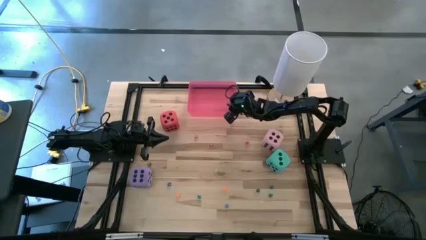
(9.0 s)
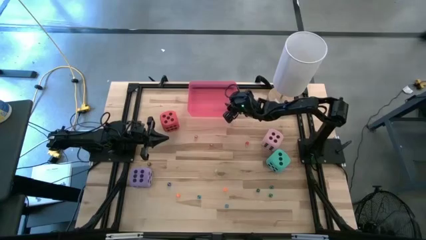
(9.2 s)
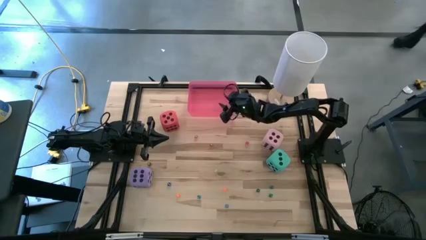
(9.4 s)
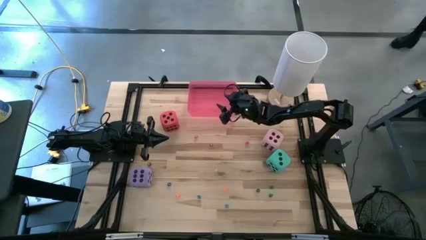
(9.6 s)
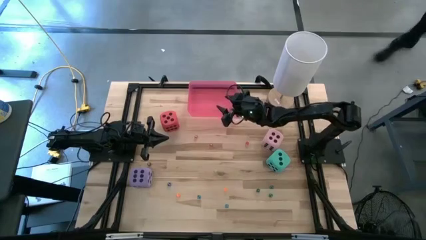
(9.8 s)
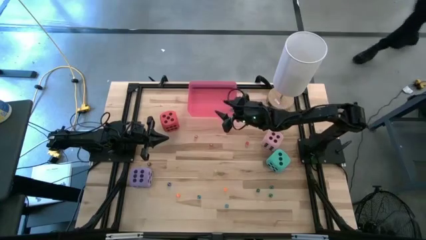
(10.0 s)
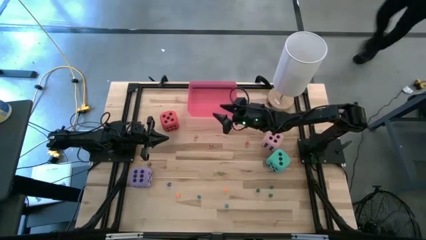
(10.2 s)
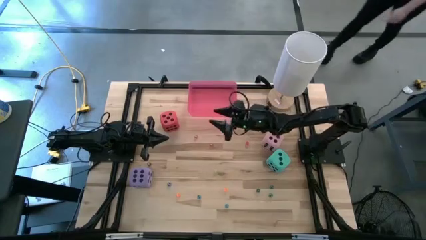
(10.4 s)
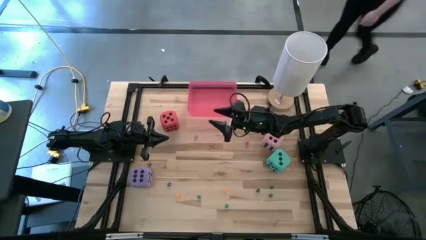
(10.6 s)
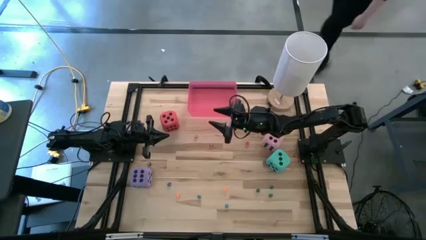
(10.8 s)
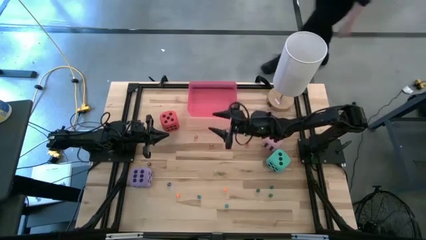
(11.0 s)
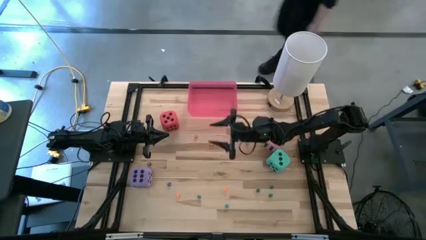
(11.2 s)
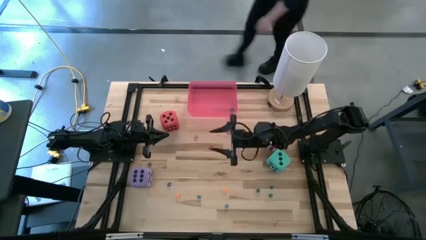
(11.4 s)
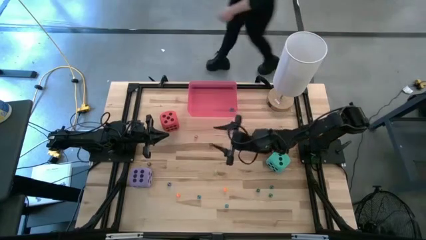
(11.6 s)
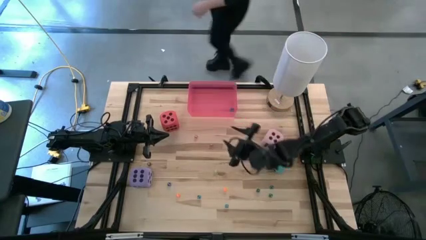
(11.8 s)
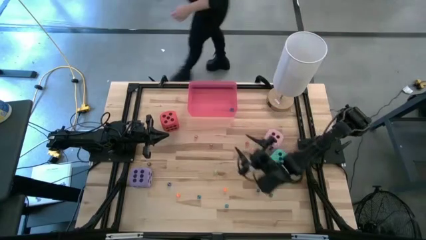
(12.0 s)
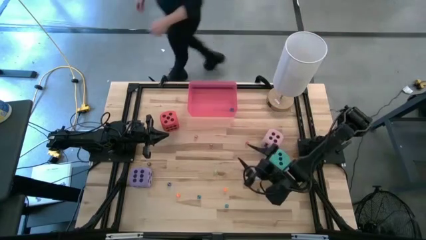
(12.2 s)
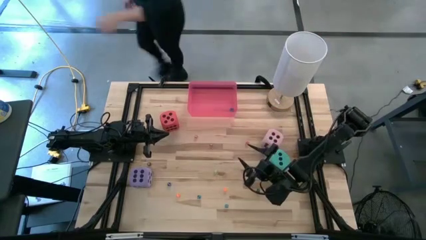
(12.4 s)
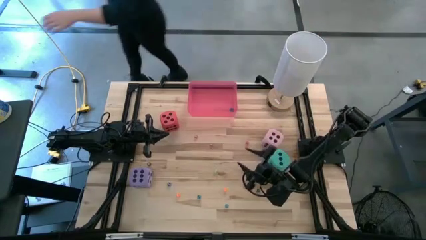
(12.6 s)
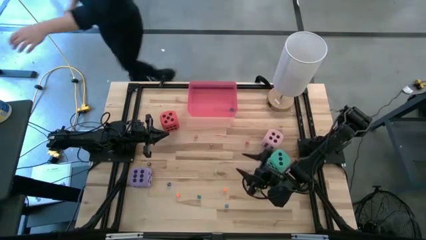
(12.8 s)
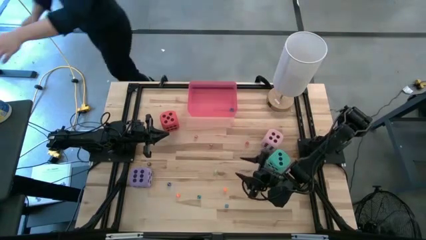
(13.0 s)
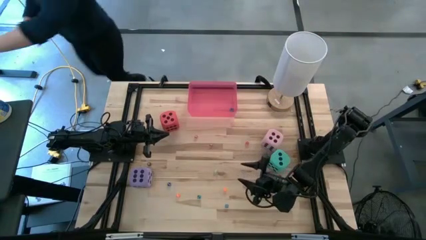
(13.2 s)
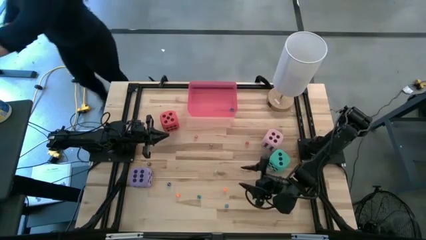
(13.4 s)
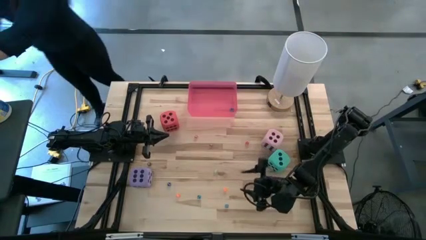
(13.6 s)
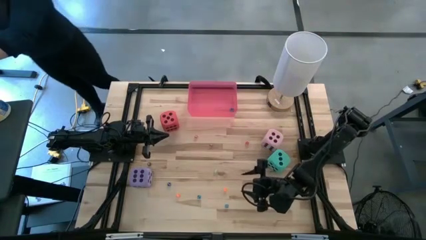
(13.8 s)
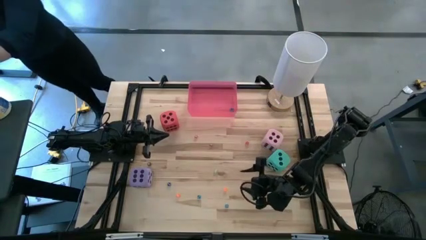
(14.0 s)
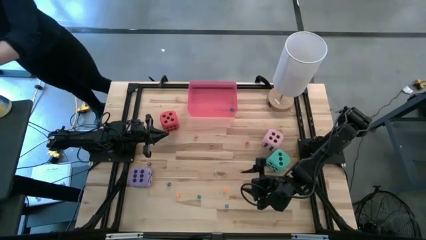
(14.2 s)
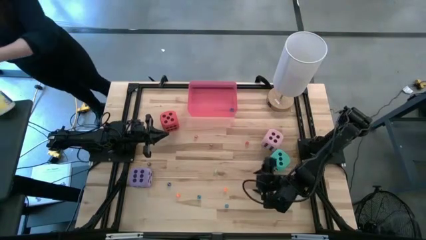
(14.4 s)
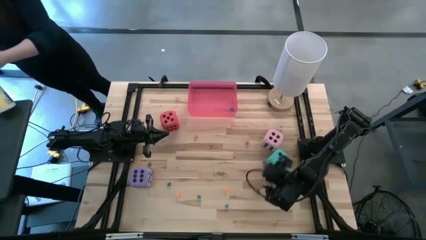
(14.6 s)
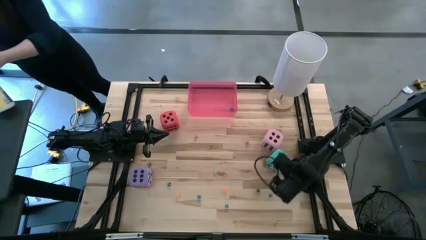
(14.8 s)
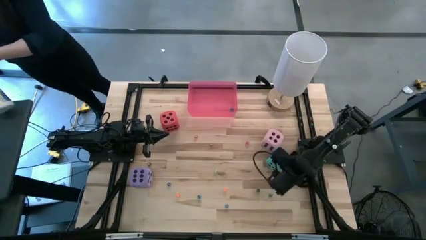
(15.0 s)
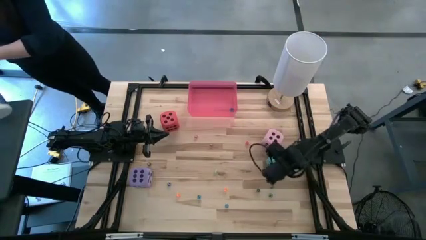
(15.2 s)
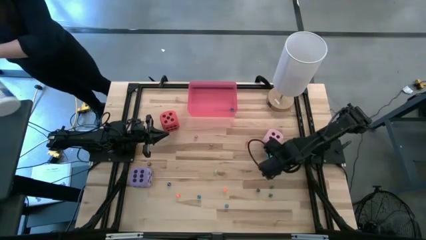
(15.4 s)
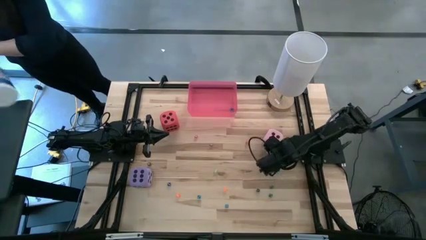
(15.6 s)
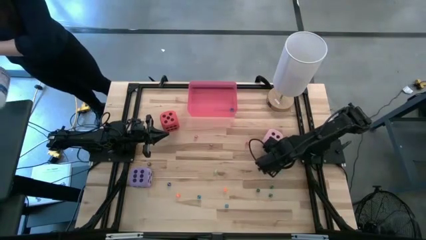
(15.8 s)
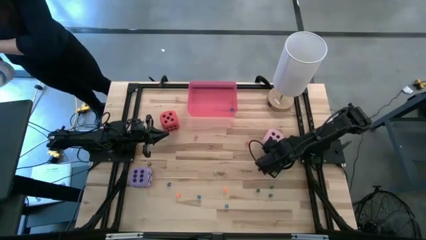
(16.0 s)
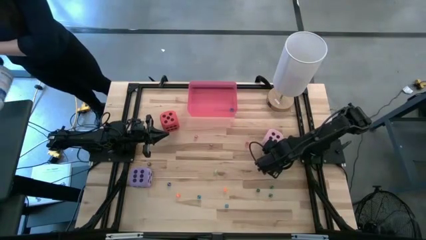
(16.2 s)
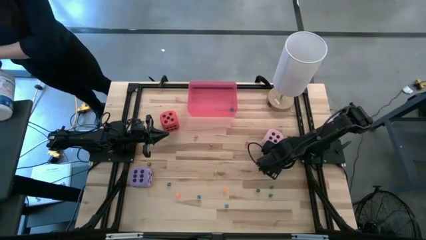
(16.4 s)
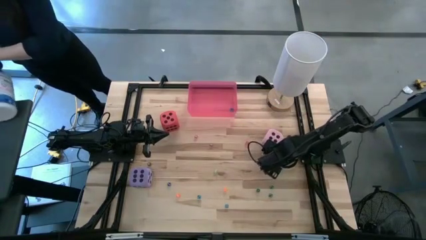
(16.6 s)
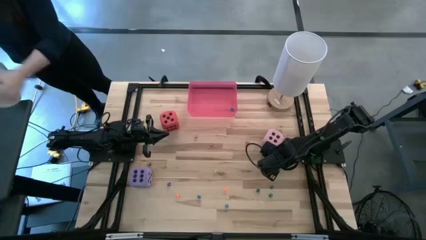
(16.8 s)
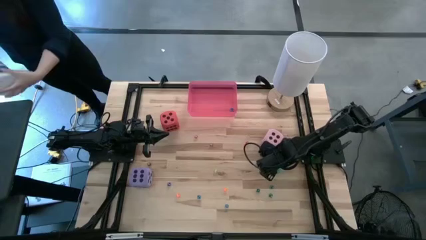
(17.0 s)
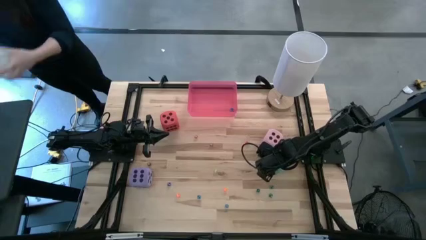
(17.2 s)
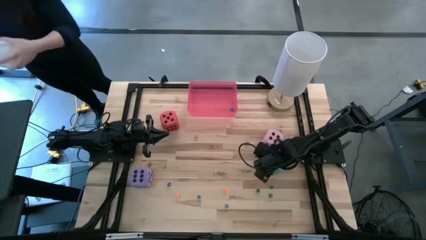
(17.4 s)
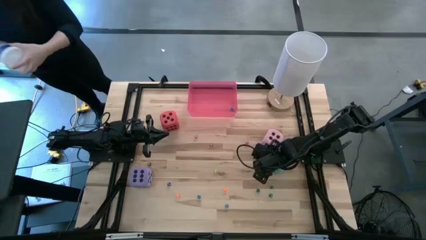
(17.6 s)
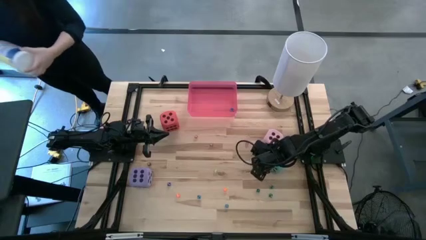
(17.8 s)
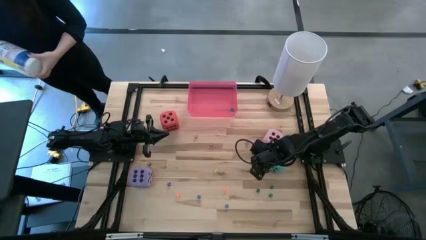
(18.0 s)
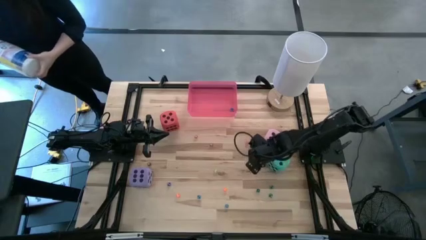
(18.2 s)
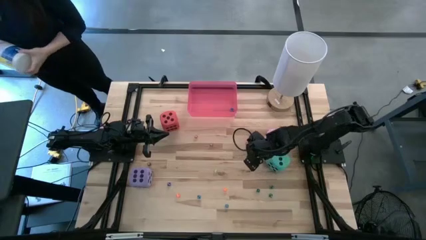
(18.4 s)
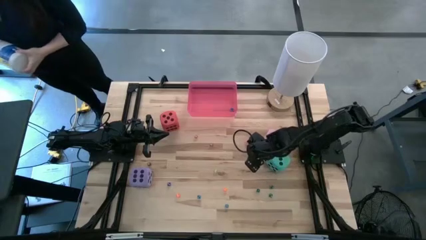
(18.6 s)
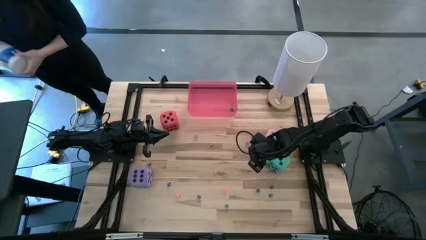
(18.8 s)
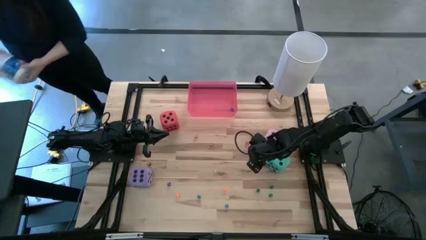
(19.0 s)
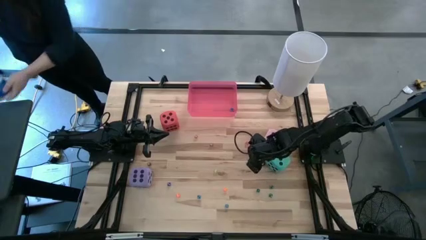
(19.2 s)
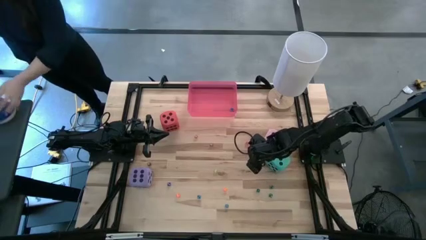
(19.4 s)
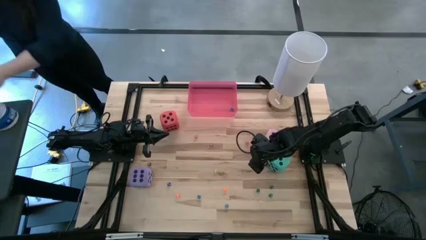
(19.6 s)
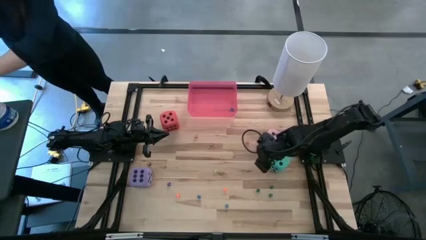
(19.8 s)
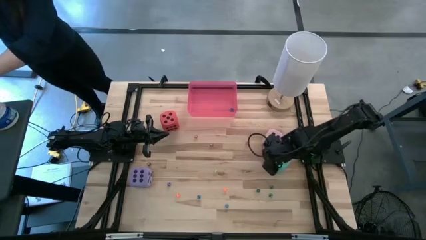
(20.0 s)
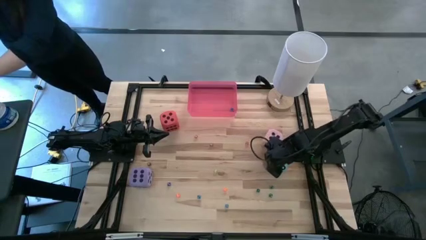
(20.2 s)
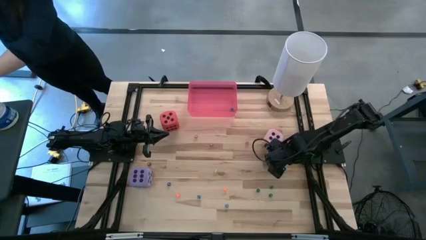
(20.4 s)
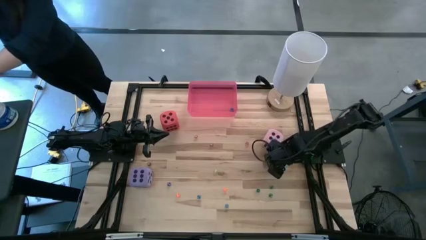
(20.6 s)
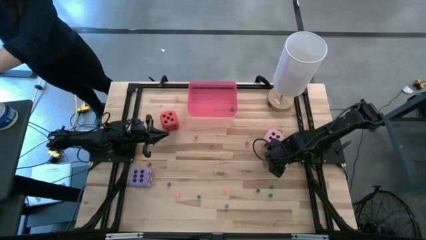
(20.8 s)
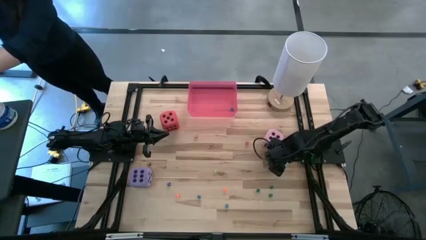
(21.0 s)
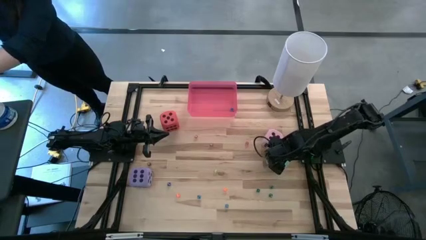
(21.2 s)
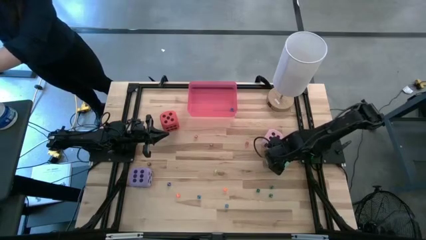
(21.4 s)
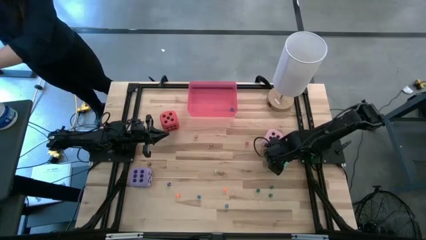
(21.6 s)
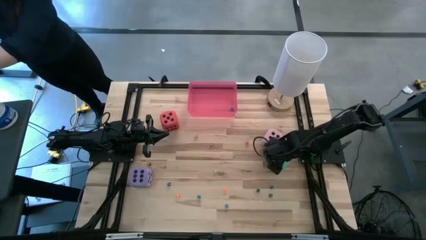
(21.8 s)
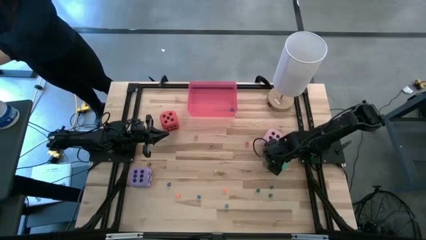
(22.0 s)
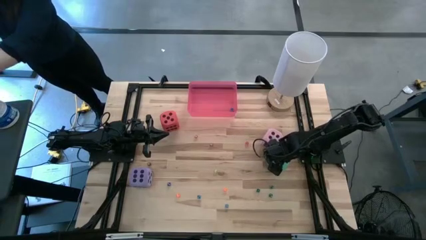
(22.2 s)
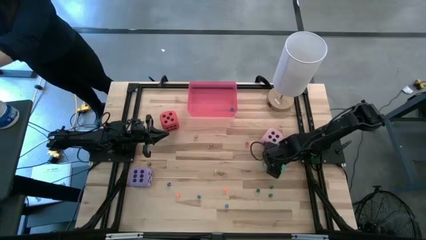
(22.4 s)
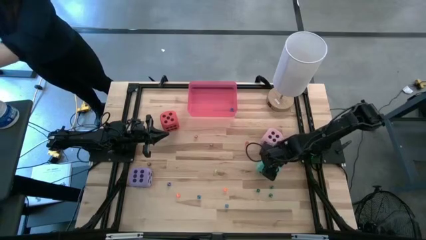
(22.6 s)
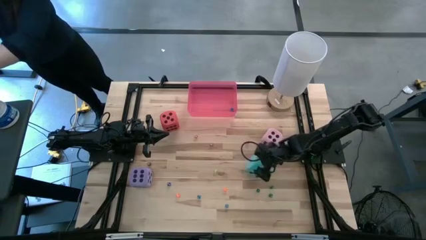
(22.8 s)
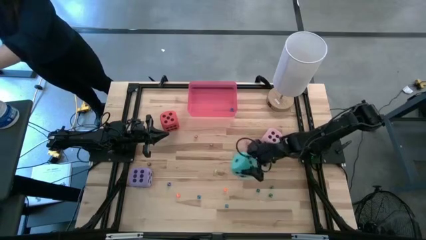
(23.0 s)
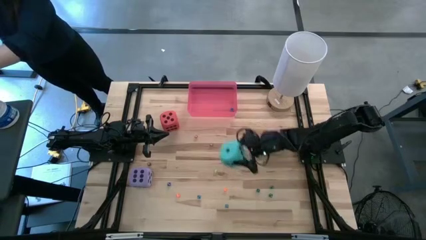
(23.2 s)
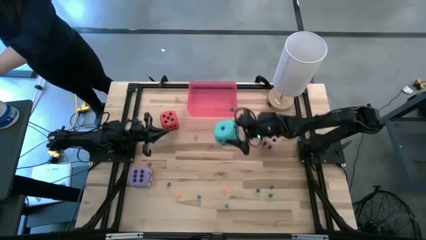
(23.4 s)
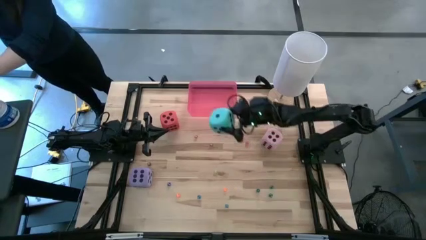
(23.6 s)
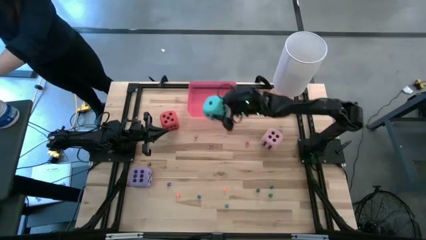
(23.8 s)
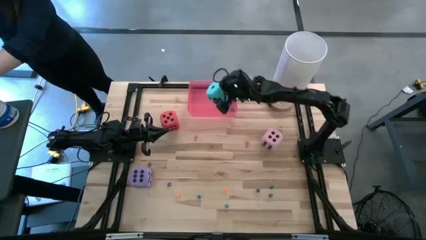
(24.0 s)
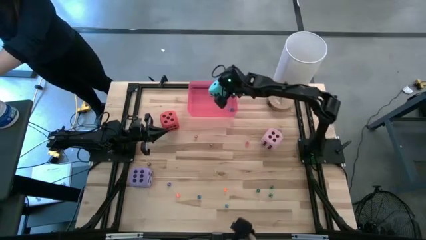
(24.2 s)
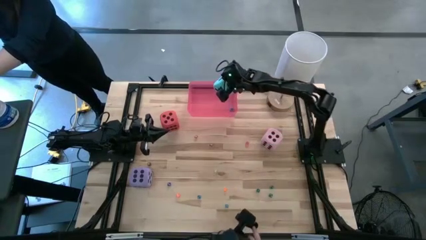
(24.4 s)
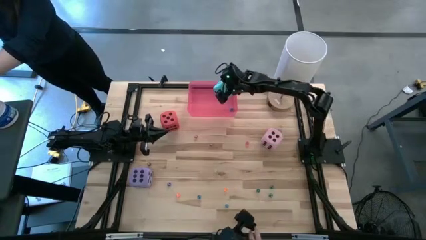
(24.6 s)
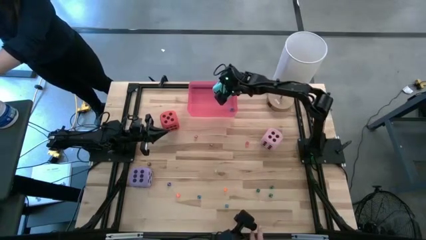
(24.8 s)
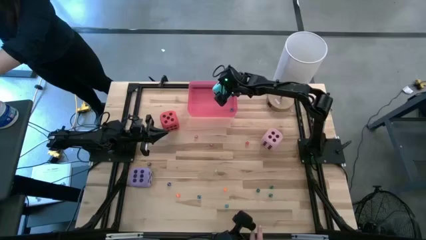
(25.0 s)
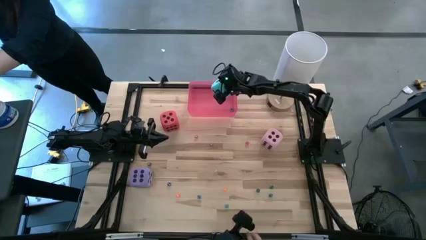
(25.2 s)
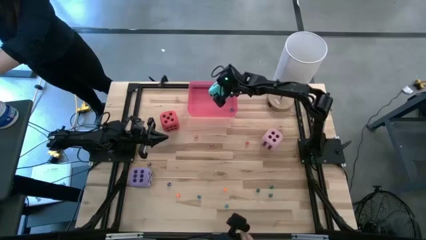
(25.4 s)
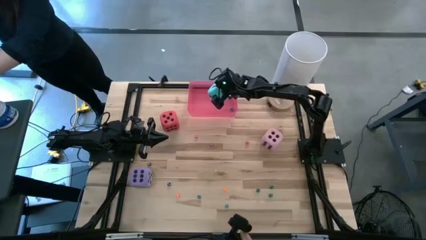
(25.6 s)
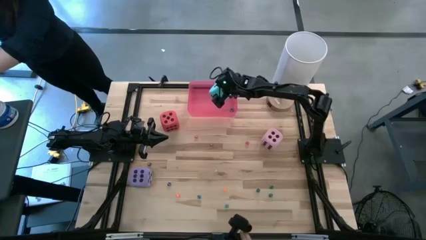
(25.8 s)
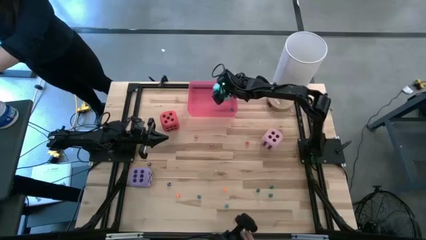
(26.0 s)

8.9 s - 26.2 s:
Task: Pick & Place Dice
Put the large blue dice into the pink bin
